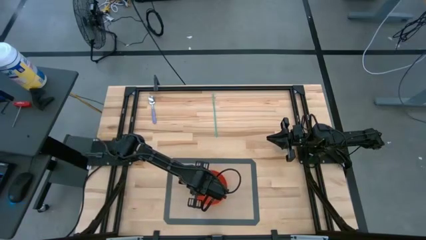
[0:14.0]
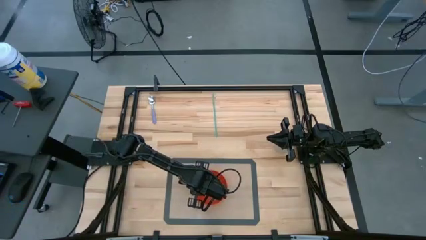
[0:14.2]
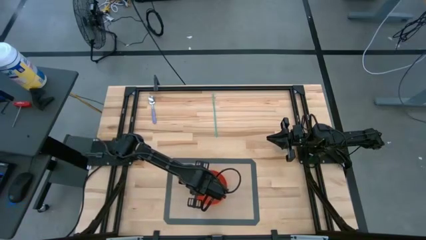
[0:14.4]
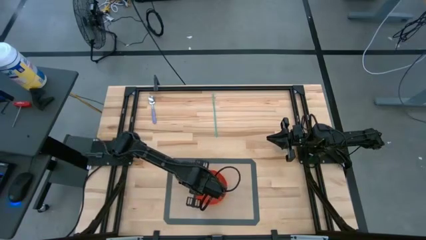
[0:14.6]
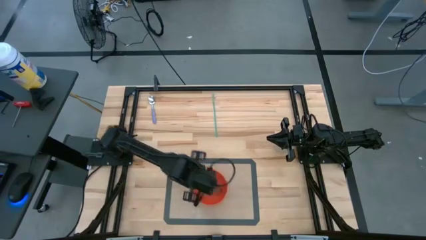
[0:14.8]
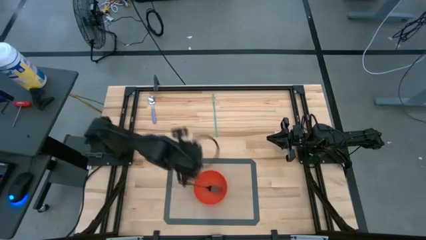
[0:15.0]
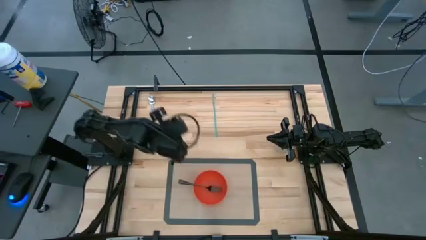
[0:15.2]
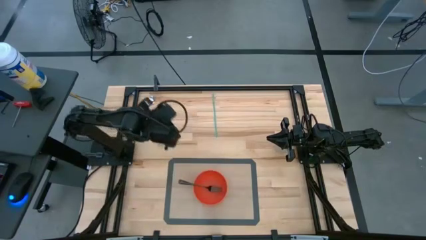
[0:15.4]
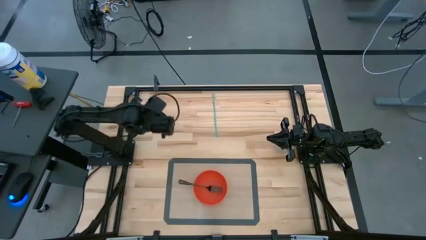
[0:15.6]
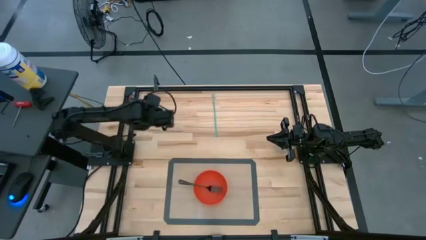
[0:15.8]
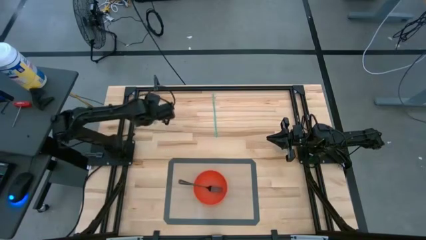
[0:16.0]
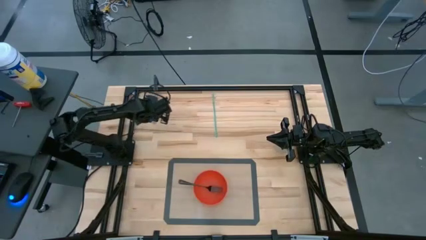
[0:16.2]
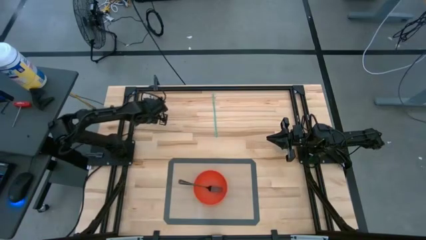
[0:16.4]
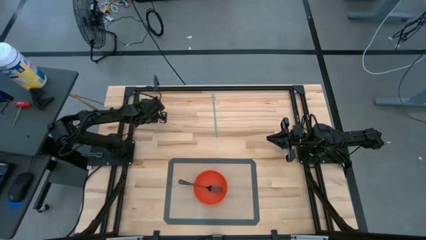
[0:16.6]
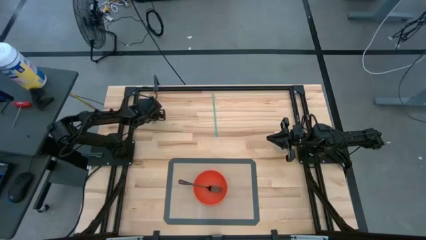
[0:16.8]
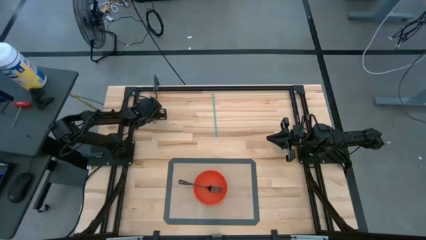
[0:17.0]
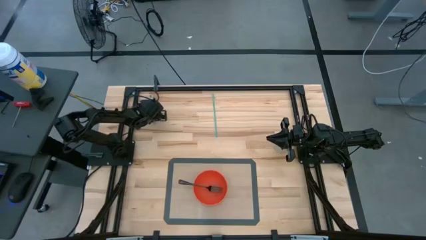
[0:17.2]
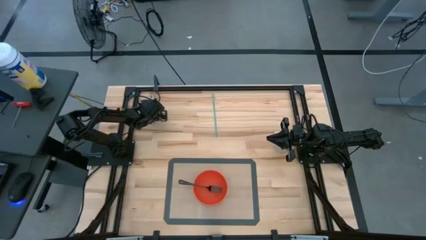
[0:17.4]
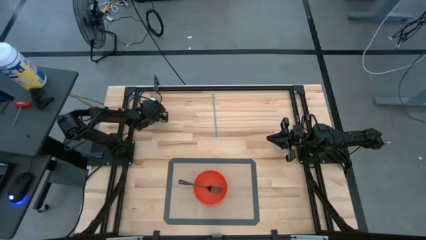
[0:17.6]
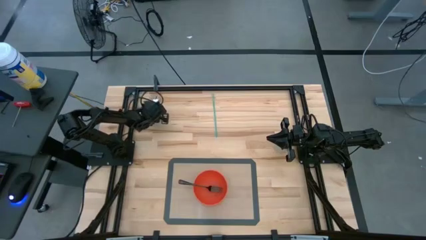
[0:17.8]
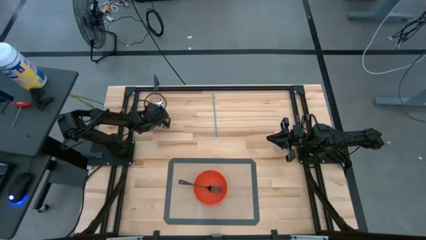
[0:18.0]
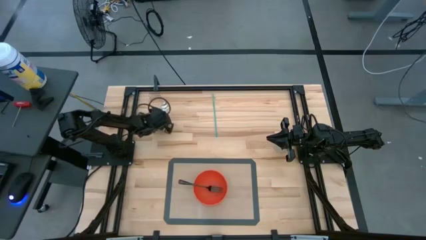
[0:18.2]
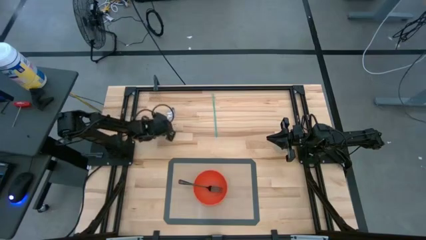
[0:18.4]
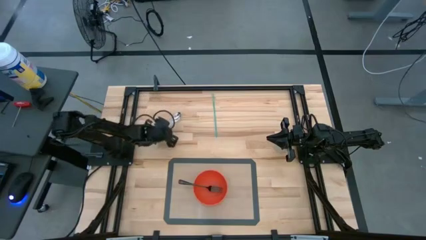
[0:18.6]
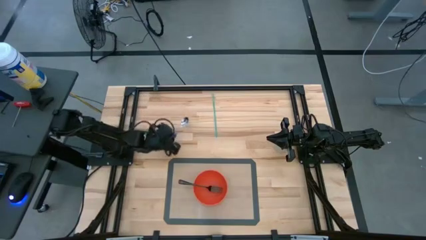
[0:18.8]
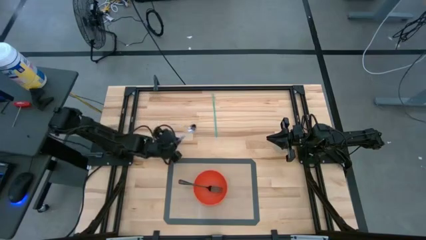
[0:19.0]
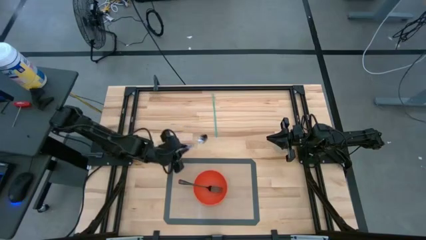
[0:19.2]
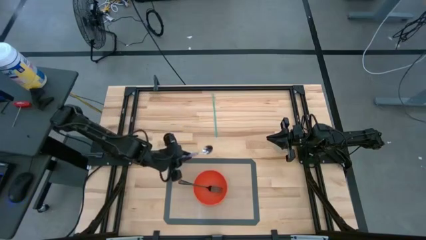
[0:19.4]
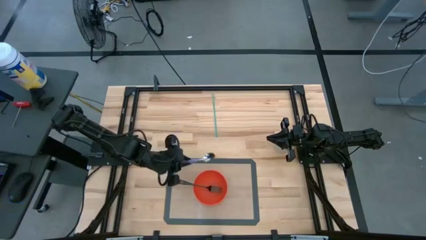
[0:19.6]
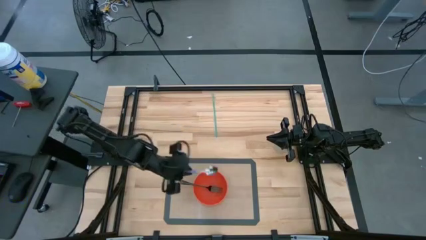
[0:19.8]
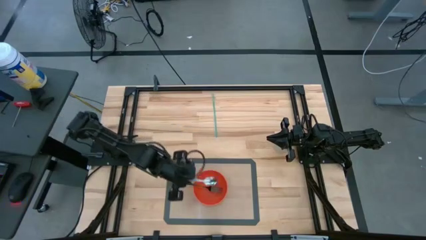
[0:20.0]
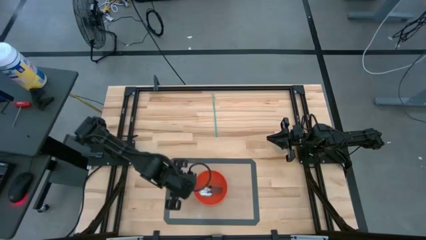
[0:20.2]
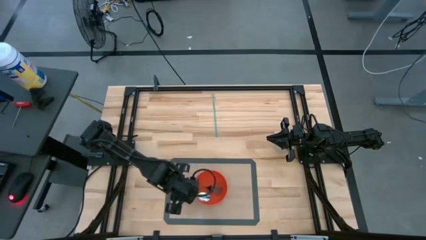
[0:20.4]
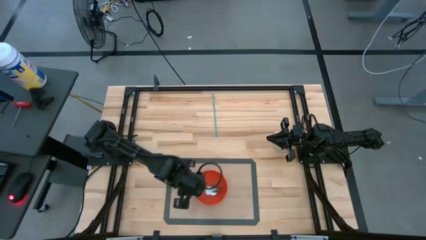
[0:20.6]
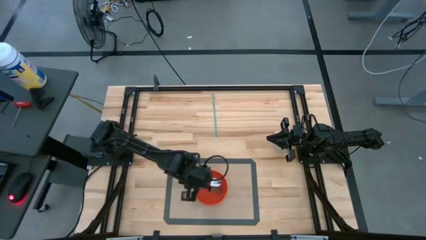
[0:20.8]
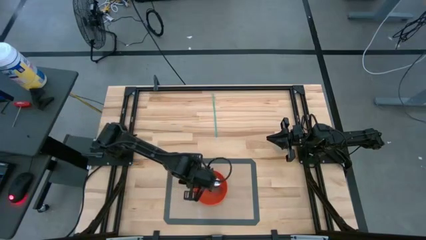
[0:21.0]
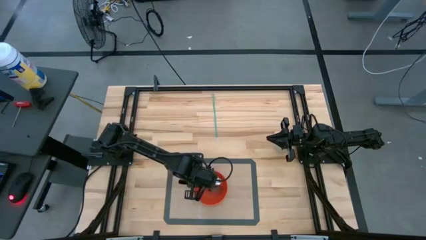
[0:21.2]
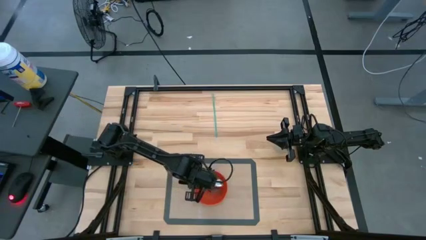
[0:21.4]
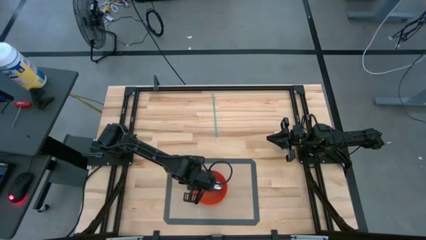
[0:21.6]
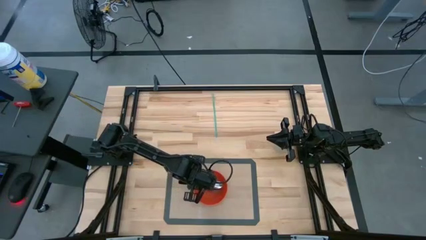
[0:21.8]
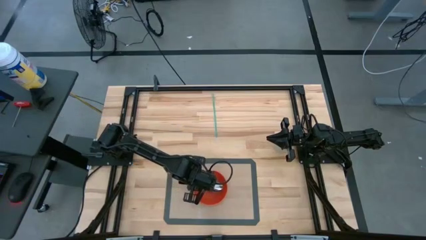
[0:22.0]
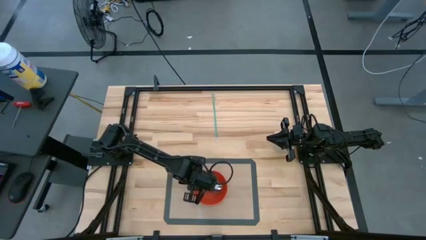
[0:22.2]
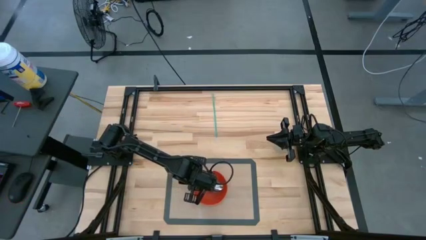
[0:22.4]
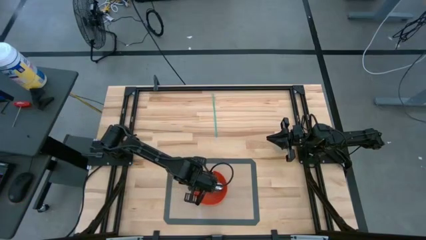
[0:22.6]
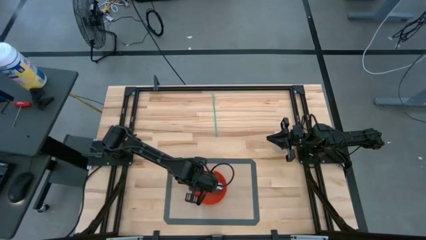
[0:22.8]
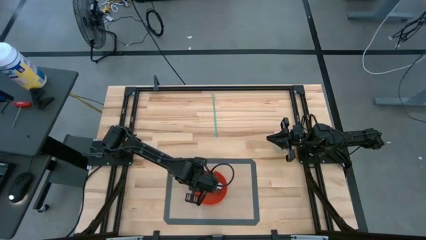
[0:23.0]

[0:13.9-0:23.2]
Task: Pick & Place Utensil
Put the spoon into the bowl

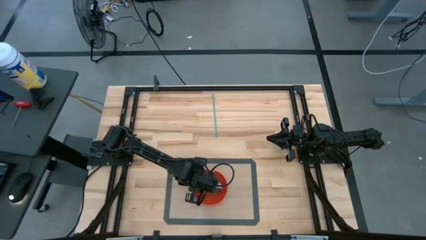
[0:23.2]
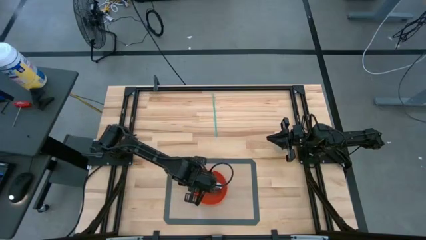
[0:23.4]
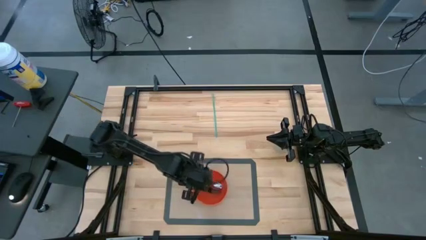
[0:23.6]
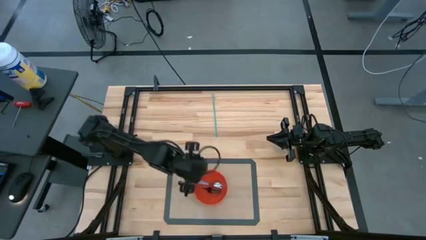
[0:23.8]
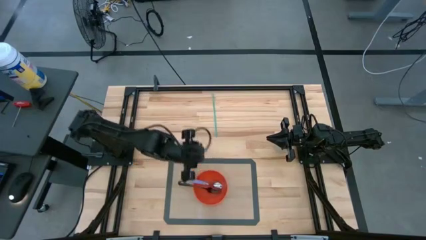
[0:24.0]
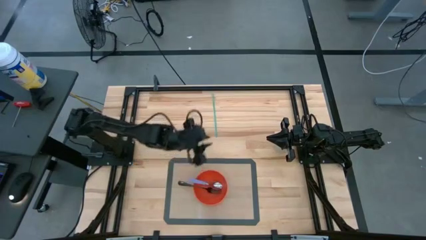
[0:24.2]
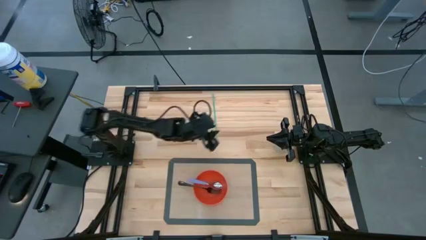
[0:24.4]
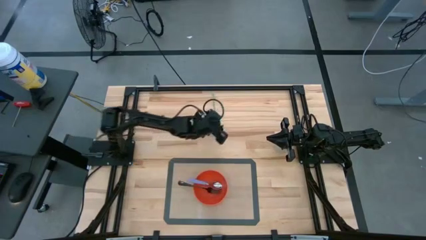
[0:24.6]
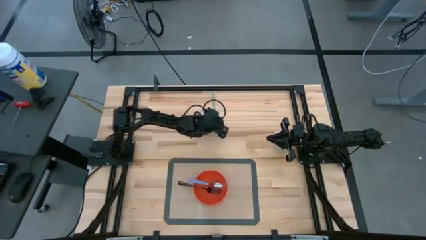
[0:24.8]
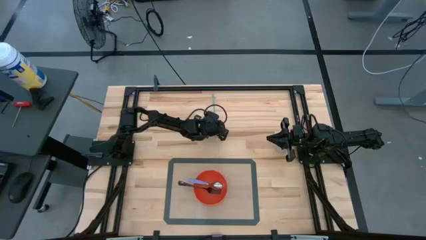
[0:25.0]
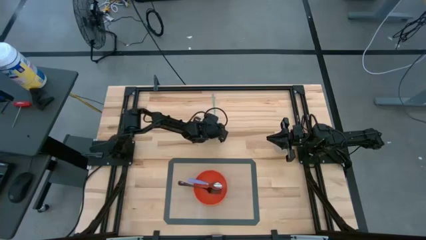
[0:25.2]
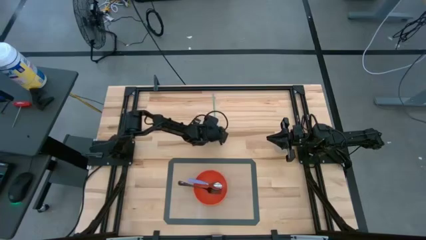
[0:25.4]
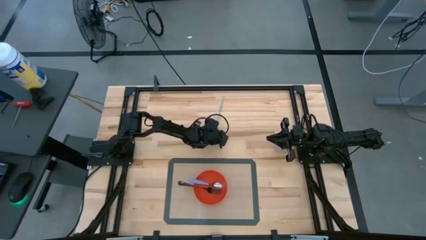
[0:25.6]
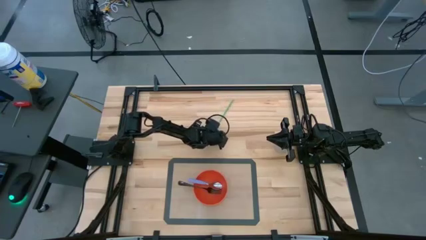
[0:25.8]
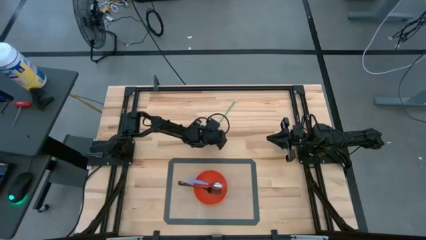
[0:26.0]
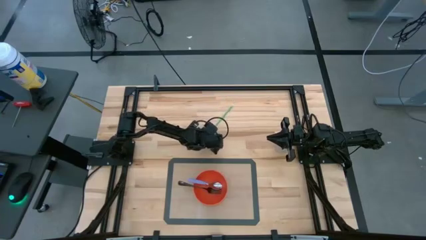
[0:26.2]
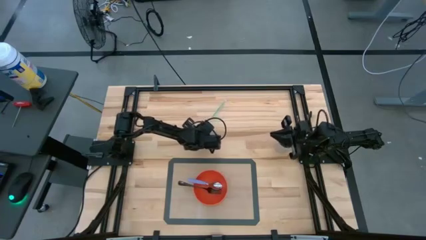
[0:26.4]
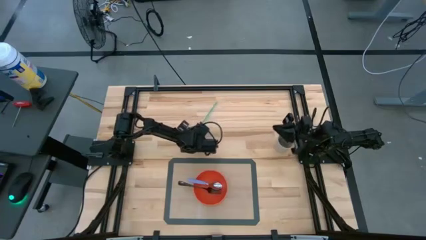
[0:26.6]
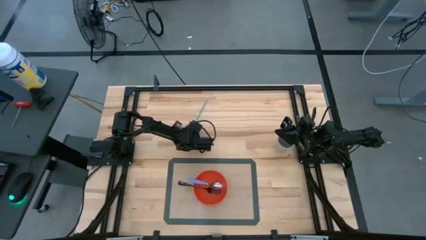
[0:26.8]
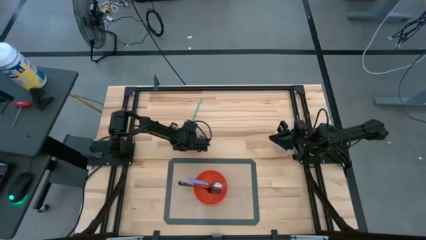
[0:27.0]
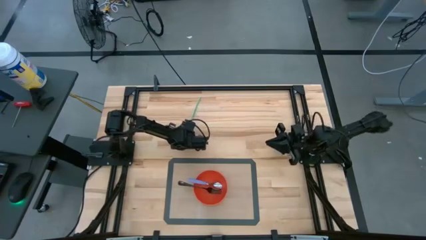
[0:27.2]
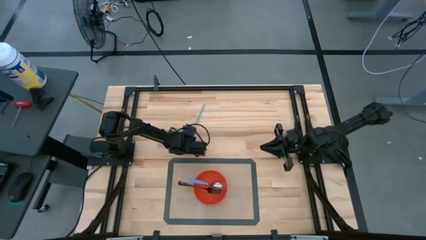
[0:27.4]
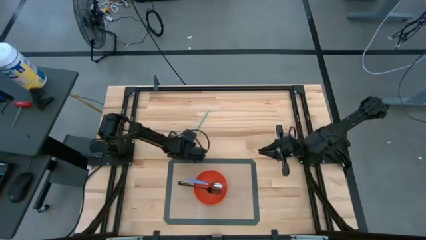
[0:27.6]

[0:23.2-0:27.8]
Put the straw into the cup
